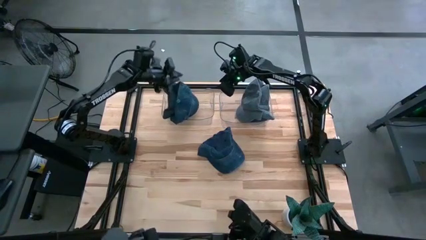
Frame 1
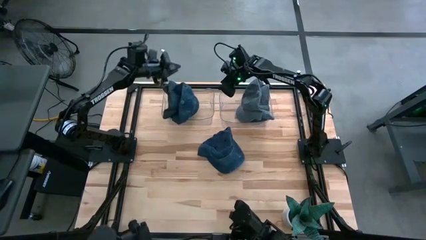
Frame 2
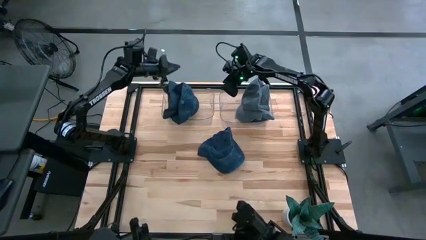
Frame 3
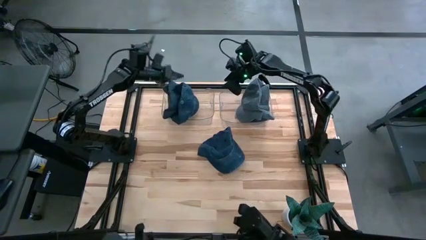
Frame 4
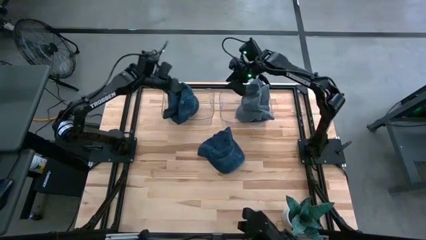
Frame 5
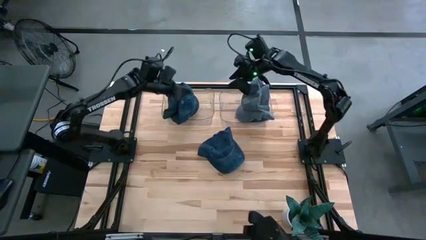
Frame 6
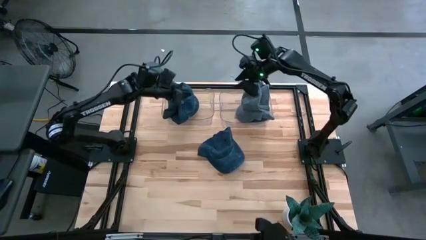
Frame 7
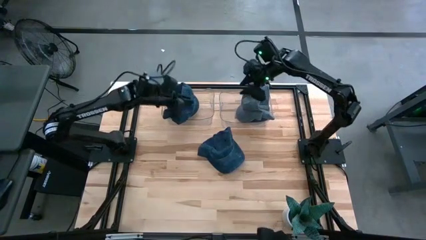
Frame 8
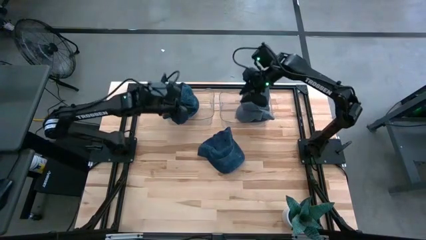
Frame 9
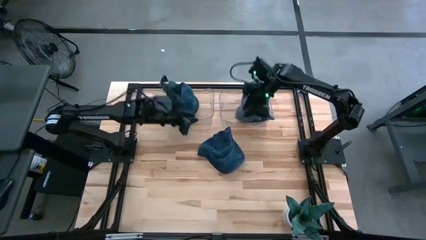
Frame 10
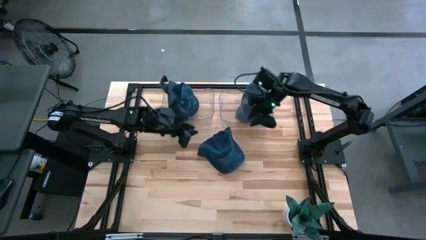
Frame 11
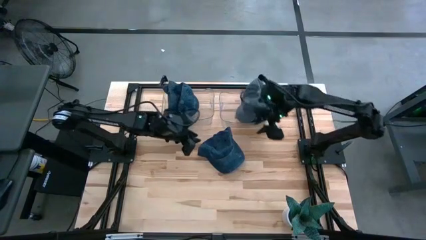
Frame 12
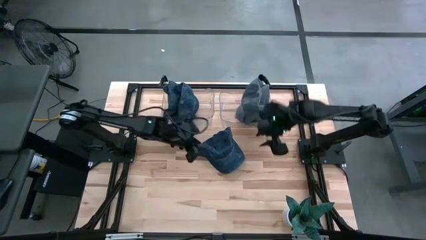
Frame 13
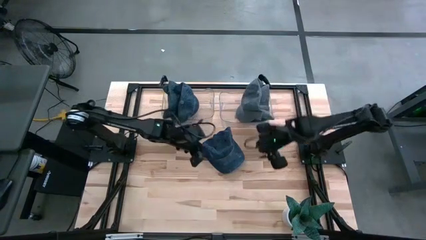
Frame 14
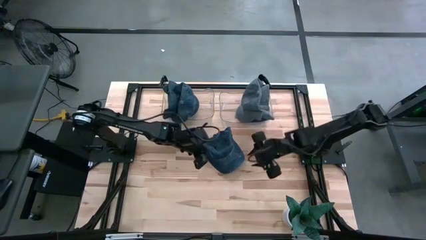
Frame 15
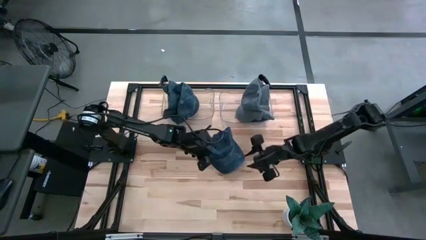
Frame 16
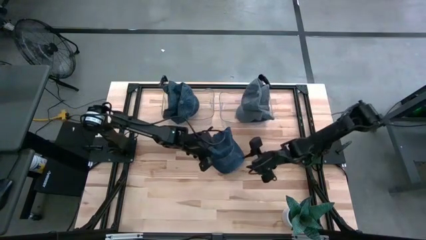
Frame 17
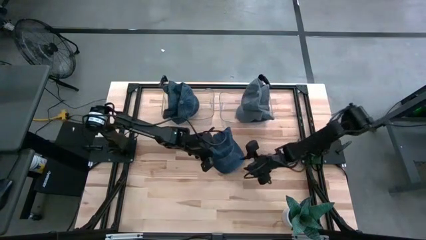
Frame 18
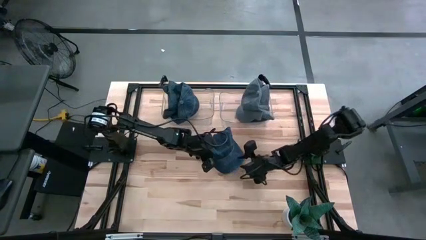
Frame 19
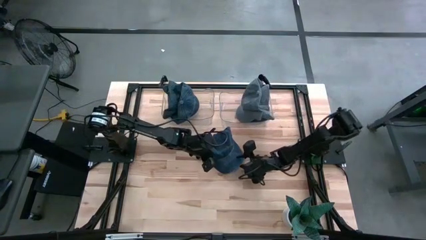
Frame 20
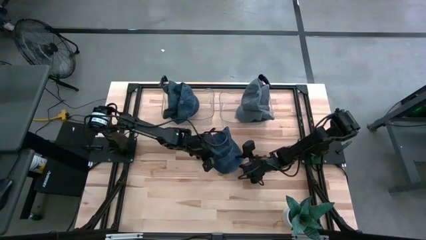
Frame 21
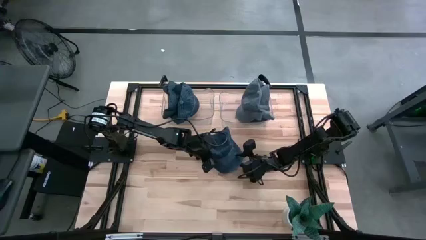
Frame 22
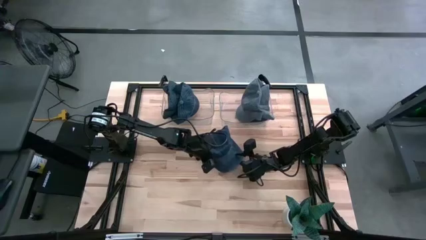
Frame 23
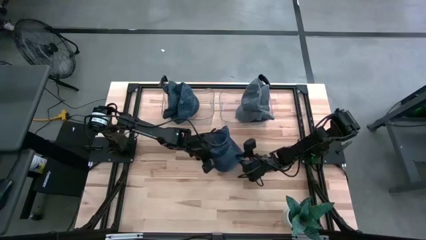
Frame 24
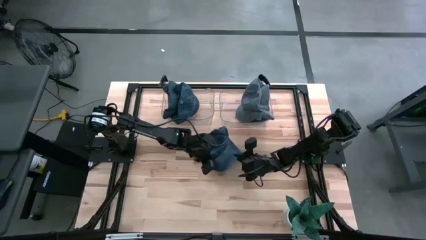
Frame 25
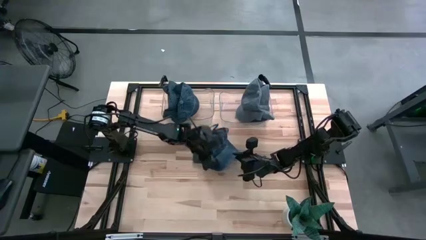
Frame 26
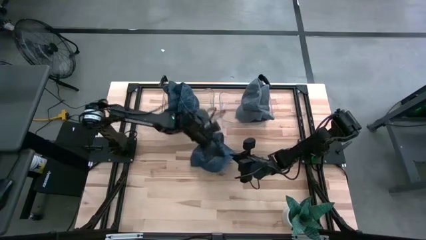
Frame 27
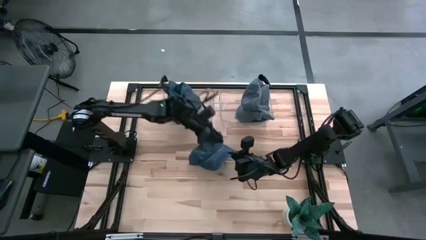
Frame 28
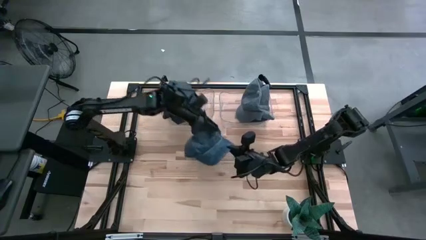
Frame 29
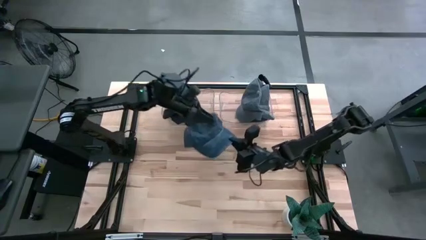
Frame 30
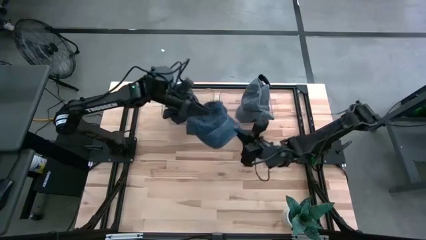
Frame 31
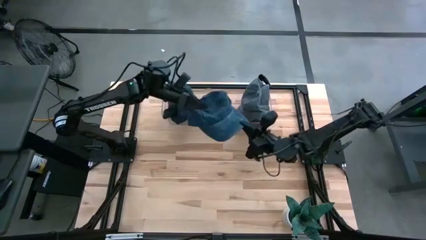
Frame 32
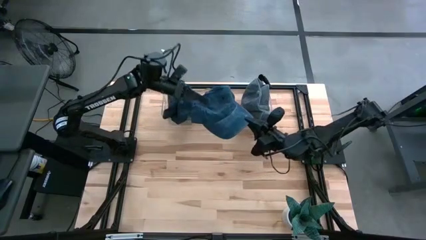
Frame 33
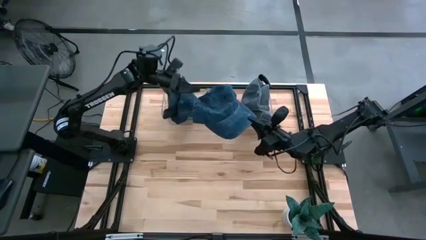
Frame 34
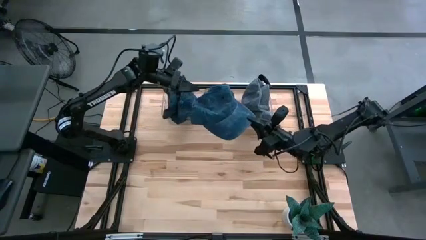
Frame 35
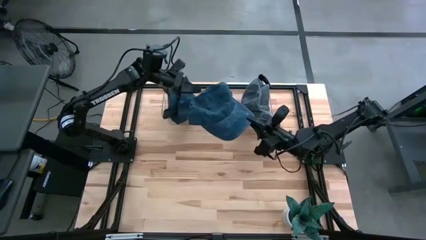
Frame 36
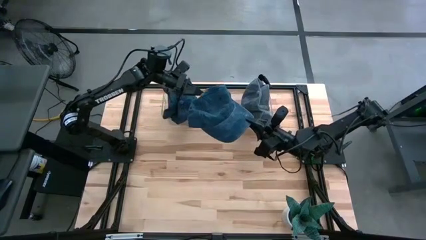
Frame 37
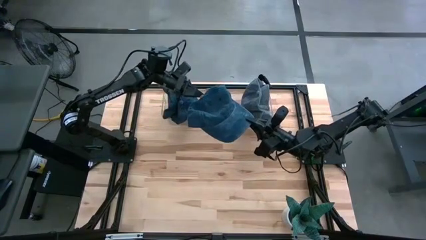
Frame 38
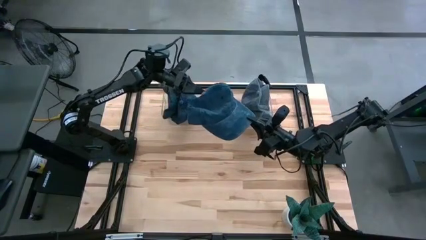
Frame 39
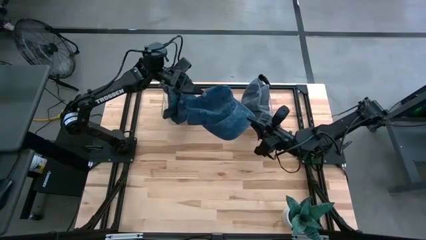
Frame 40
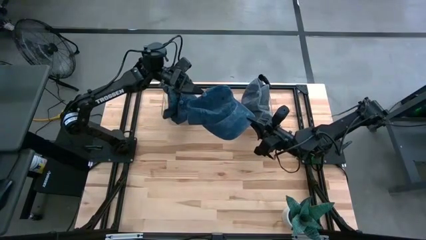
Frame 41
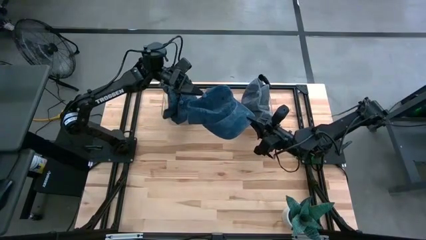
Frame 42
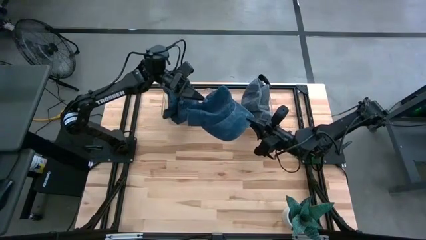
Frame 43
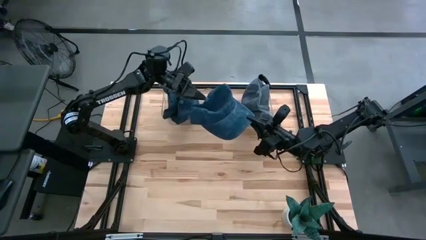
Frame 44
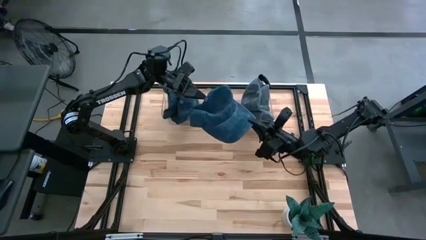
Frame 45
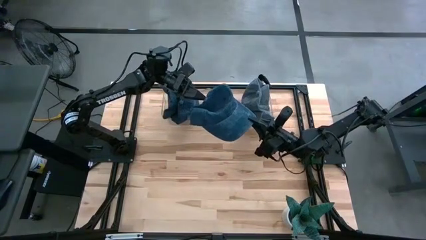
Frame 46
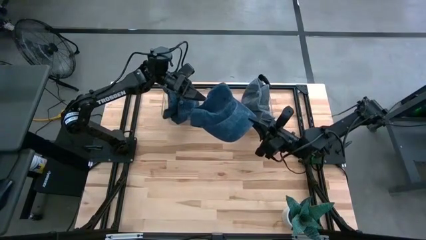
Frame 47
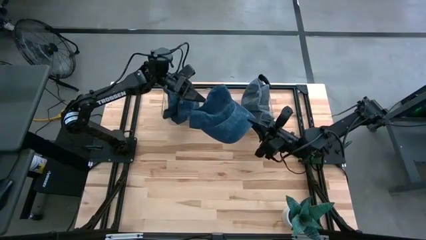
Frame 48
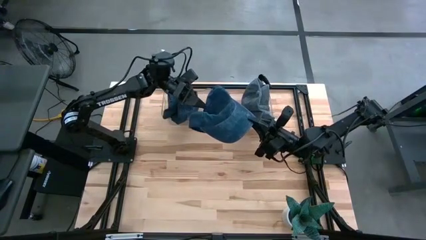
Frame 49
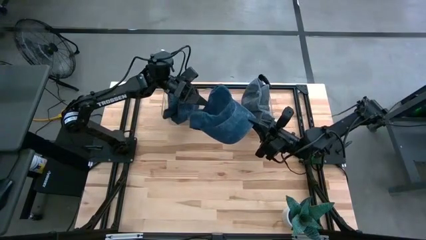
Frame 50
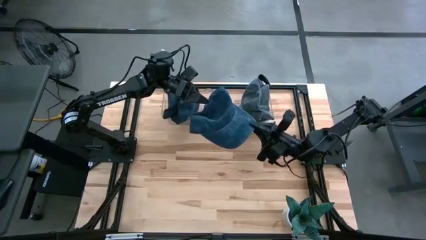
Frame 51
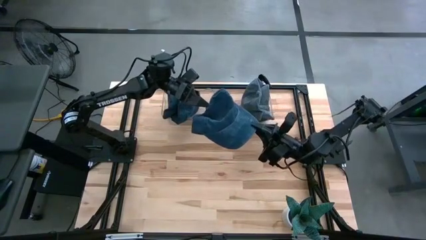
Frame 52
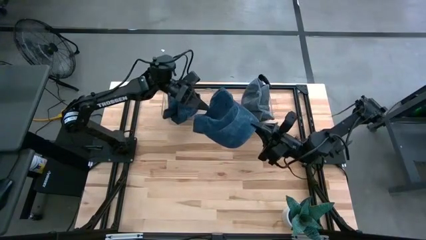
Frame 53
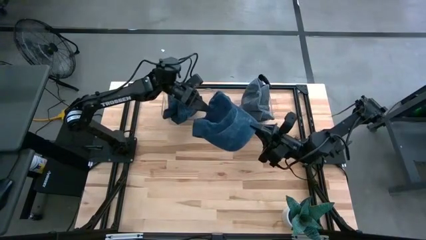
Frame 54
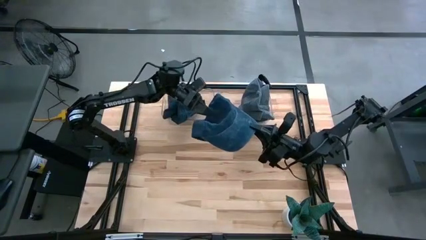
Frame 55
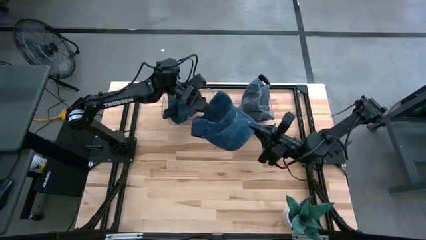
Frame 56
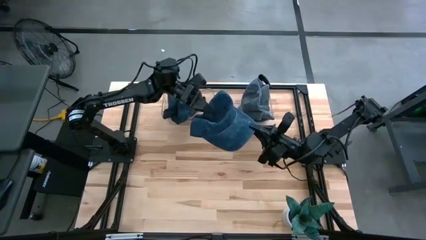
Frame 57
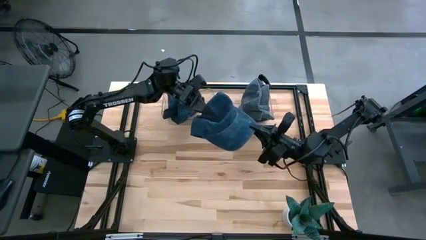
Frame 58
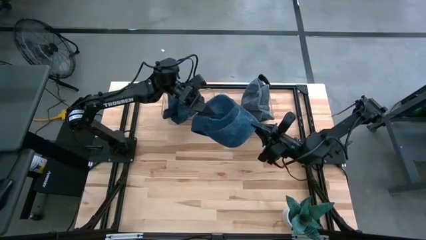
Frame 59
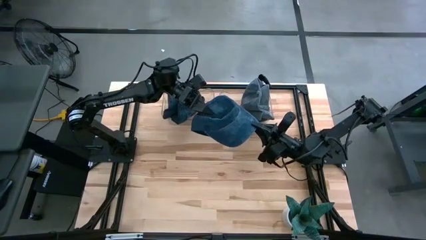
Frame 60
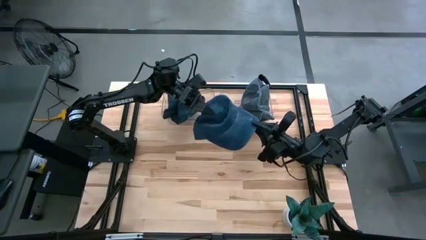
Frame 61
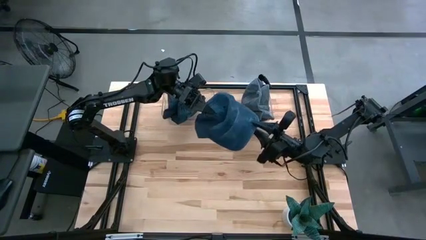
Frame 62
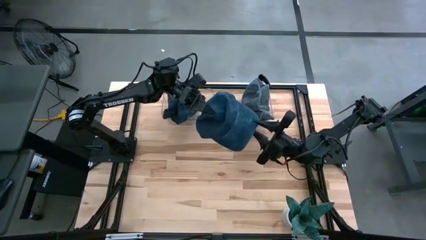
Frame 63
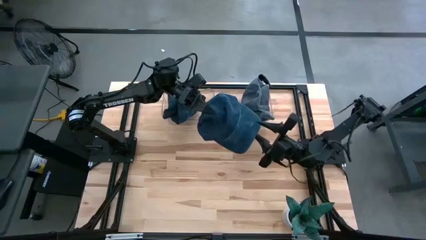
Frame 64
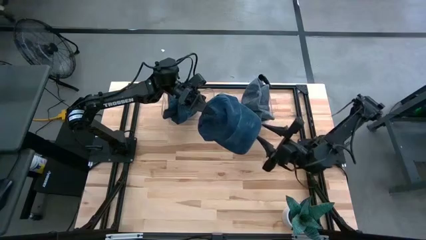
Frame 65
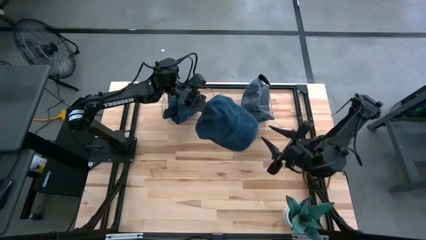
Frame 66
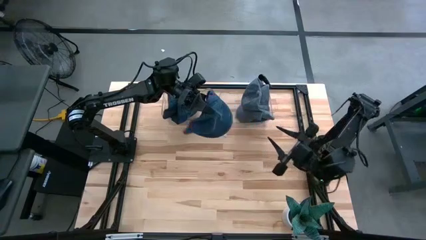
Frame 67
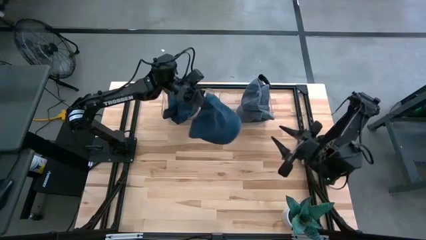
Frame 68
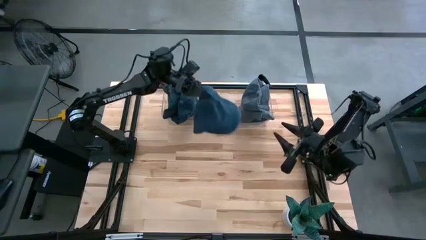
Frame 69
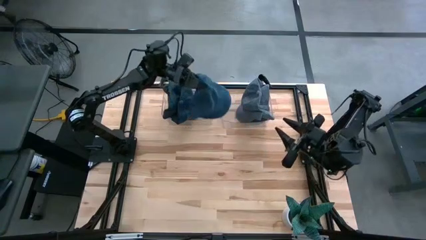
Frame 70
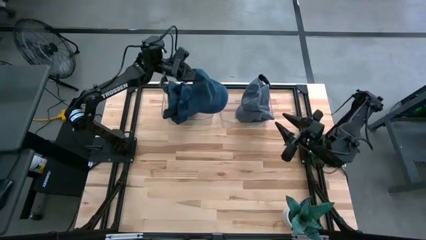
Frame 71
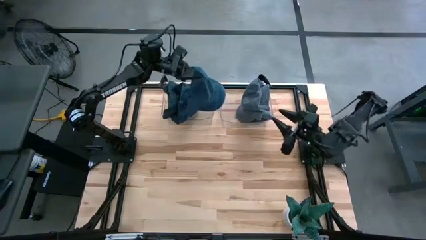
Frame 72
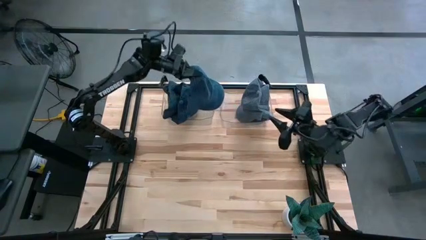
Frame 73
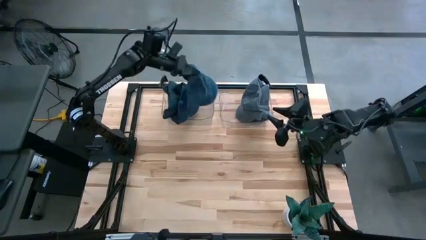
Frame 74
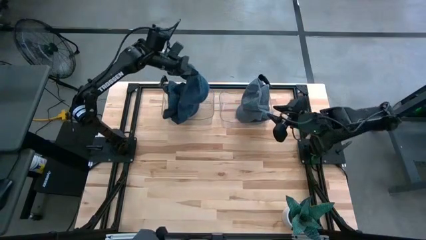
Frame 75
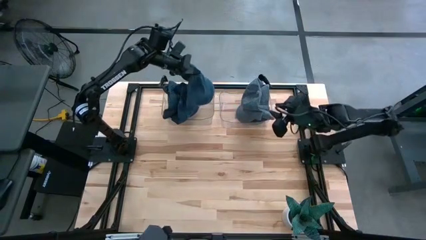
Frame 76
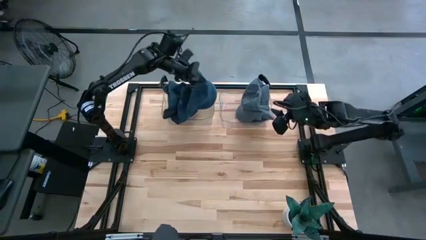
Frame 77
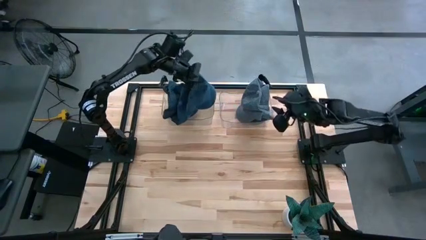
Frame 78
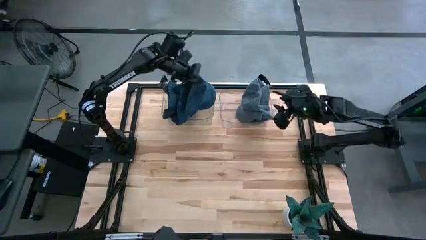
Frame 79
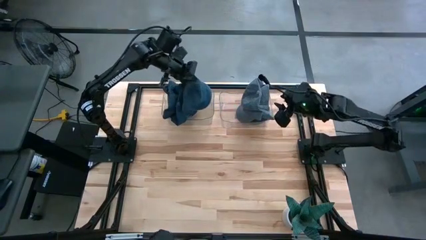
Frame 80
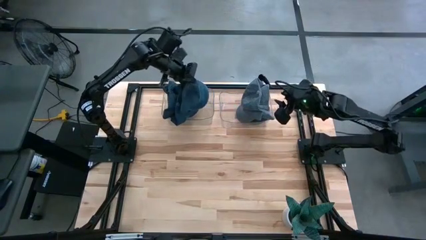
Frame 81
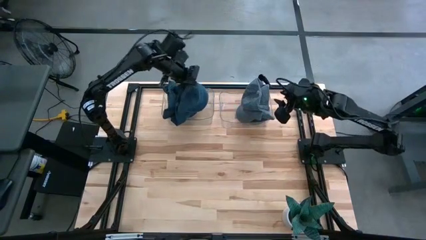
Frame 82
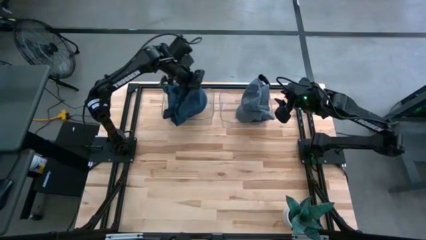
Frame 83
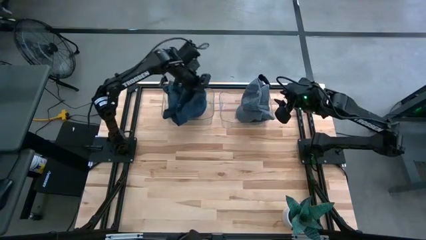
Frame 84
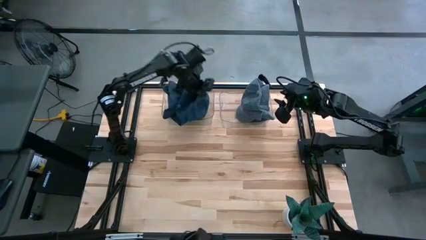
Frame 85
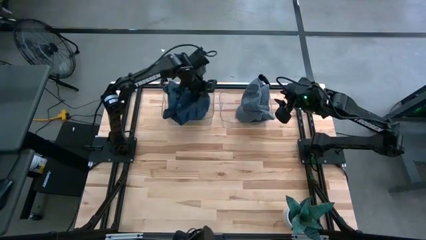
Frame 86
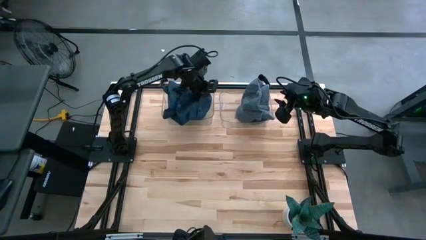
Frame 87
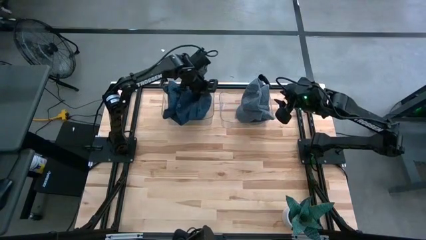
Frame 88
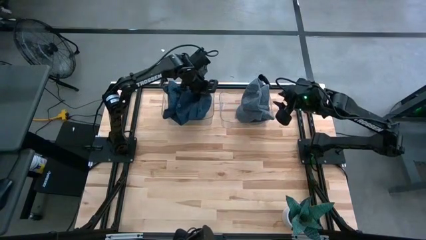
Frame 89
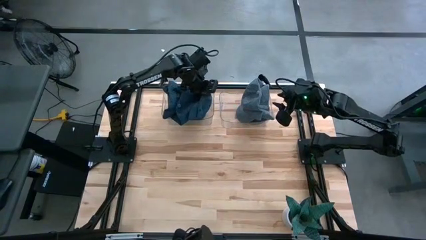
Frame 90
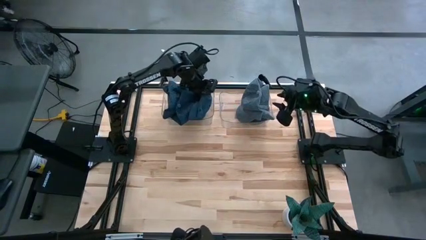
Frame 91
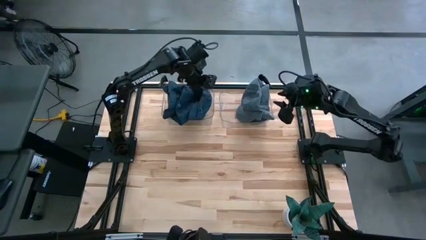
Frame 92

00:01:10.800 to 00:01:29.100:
Task: Pick & Place hat
Put the blue cap into the left transparent bin
